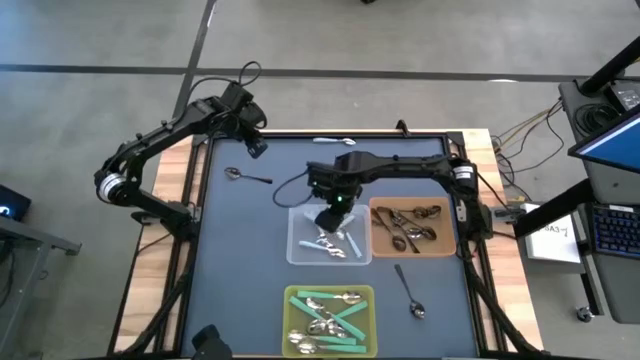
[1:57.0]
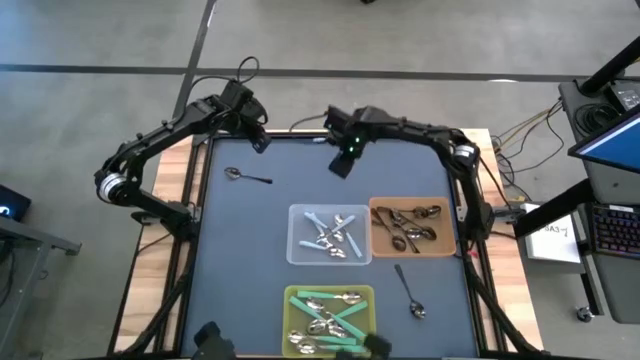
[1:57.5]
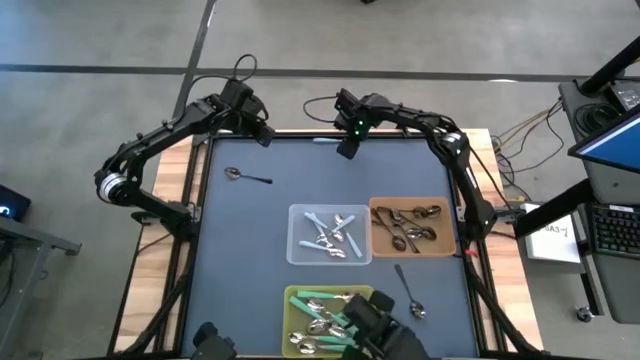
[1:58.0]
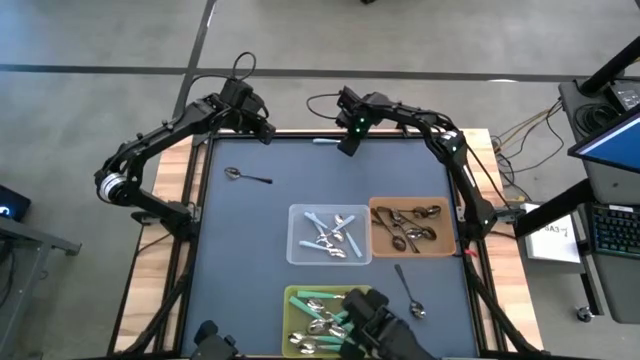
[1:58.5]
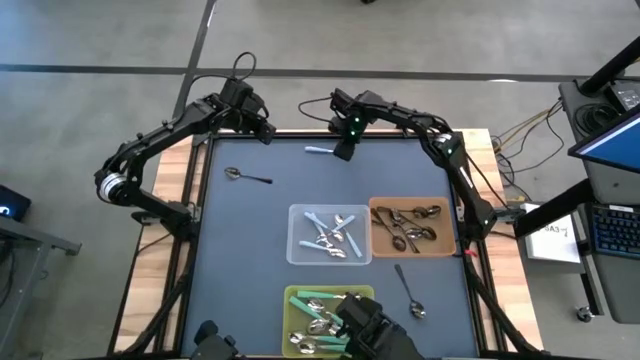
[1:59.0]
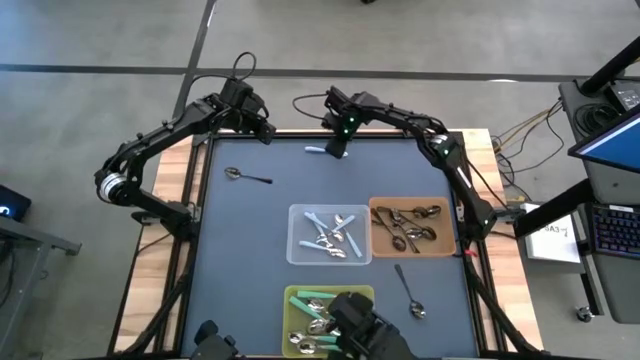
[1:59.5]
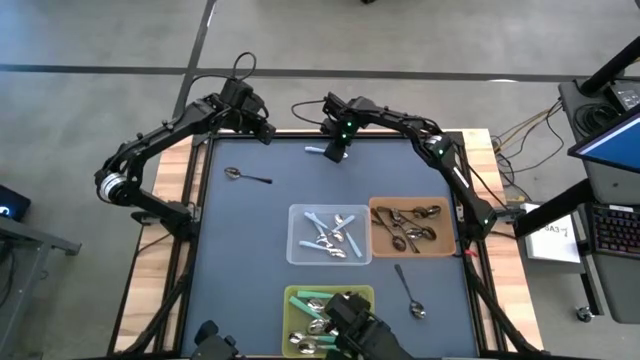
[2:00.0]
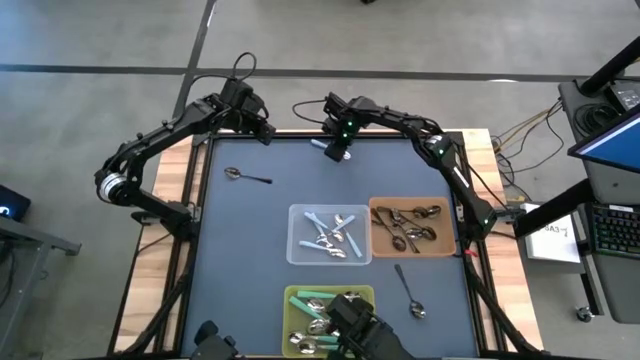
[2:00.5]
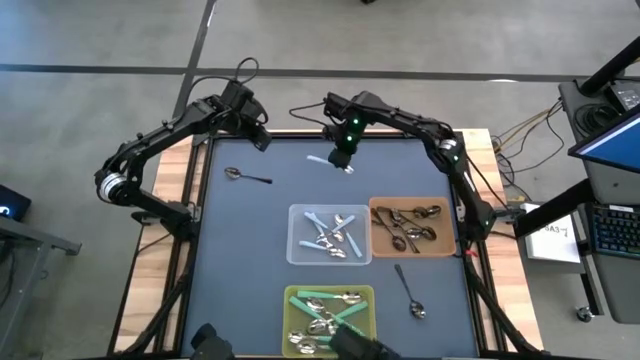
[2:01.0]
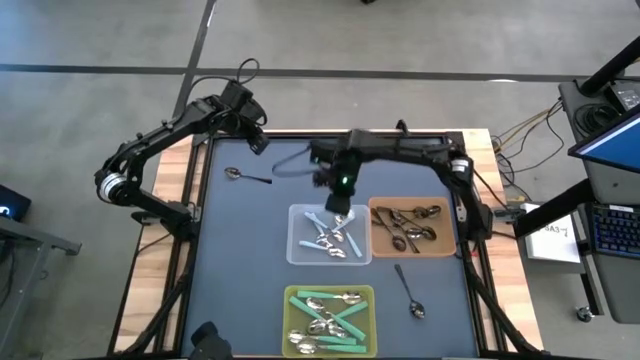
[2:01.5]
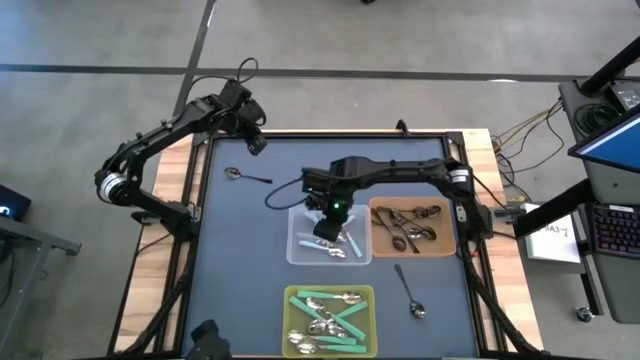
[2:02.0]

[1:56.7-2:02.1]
Task: Sort silverware by color (type)
Put the light blue spoon into the transparent bin

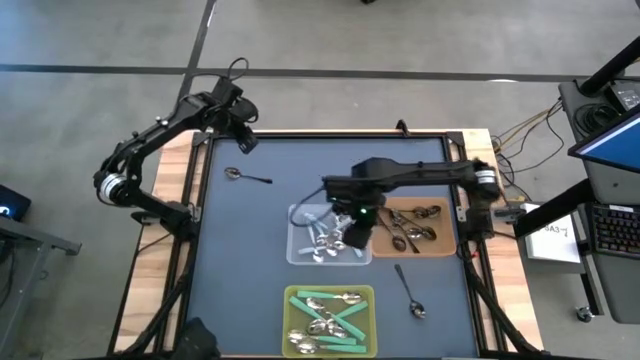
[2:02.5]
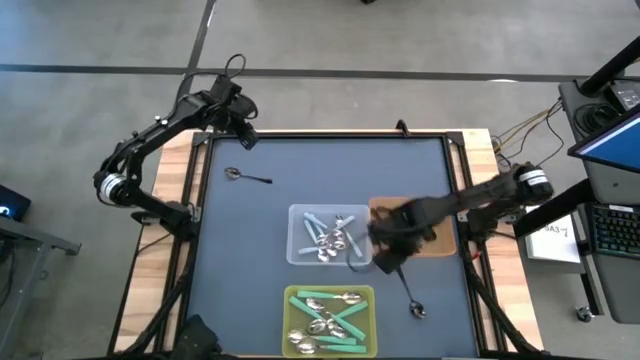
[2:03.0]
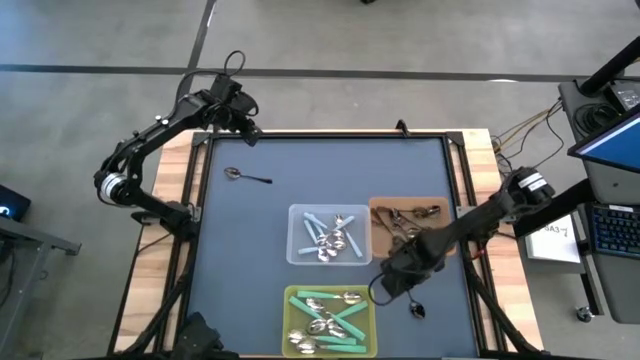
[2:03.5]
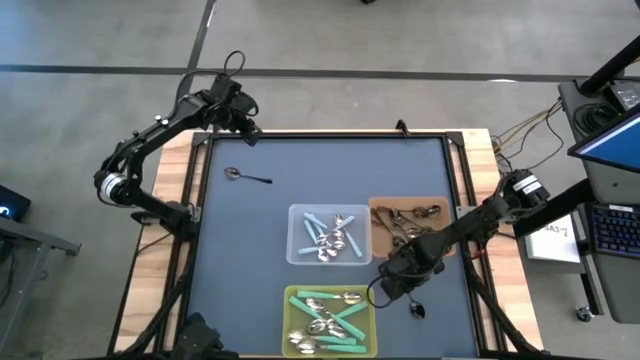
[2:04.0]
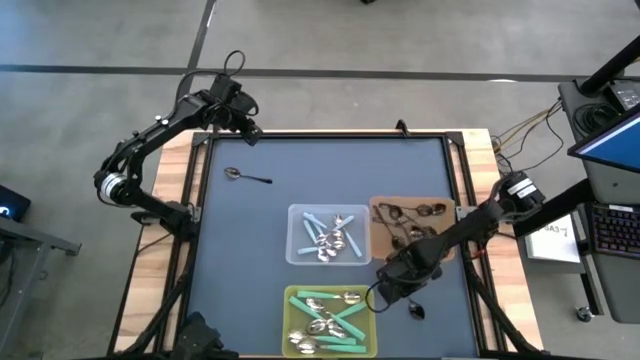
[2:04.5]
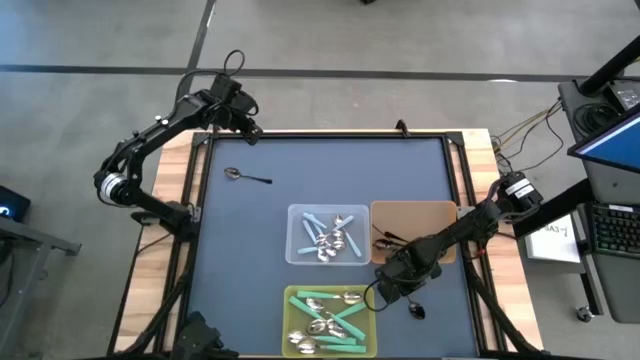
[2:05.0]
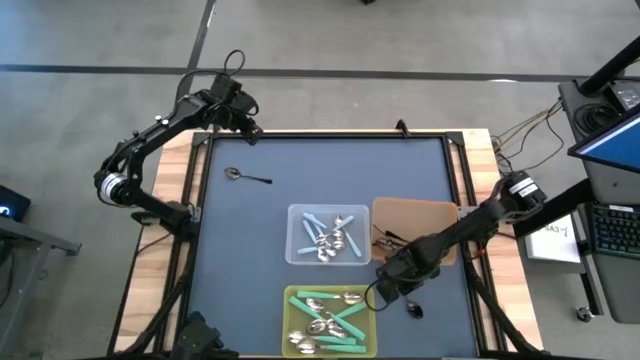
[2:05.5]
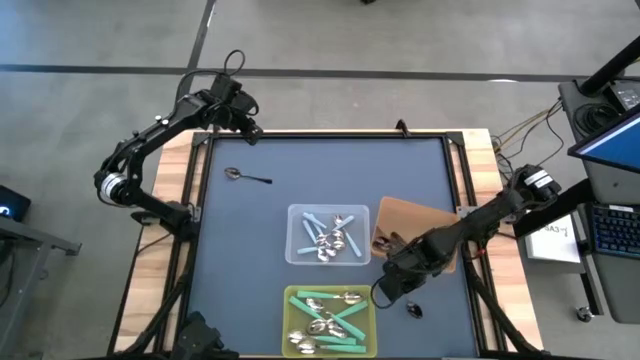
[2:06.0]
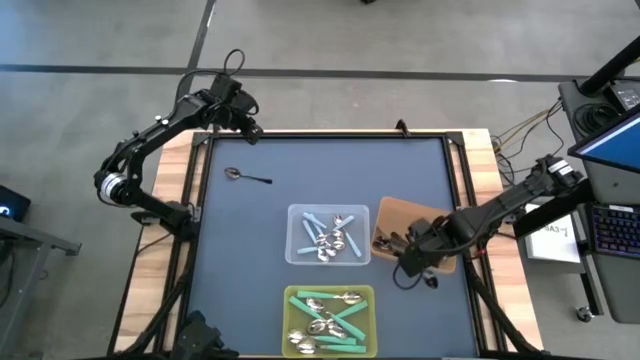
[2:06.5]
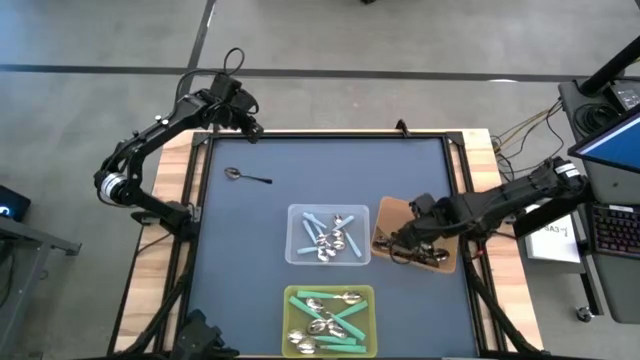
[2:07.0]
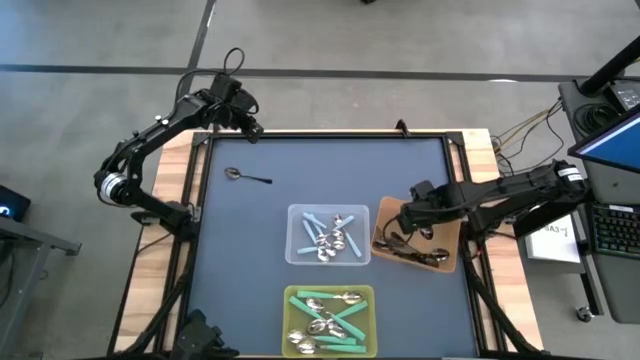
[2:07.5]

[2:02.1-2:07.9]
Put the black spoon into the orange bin

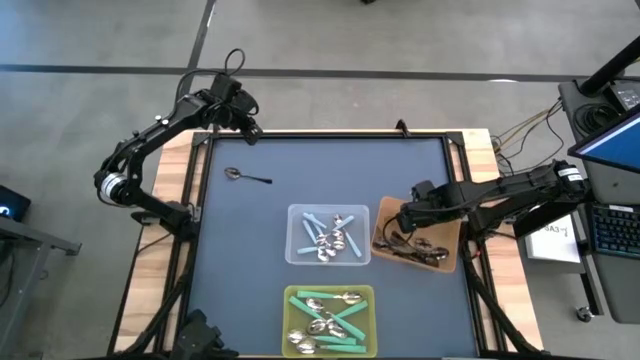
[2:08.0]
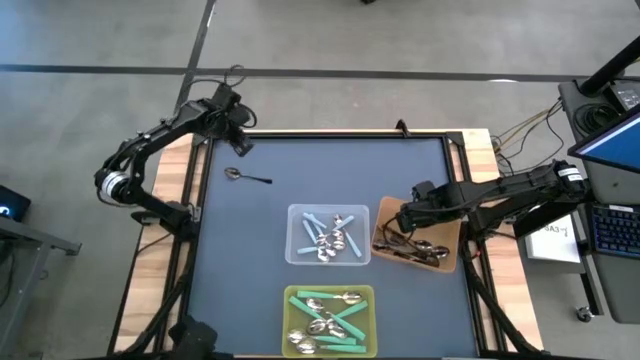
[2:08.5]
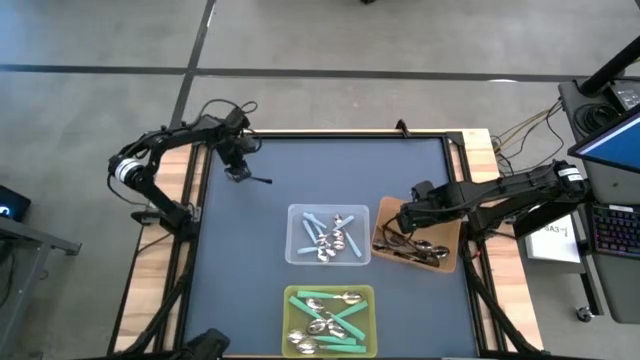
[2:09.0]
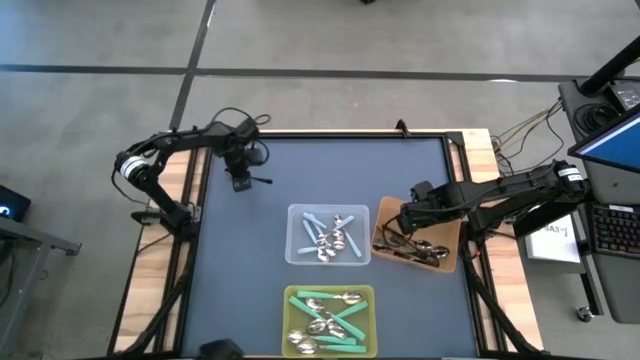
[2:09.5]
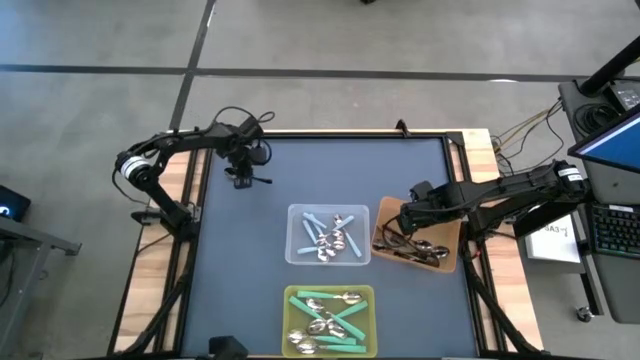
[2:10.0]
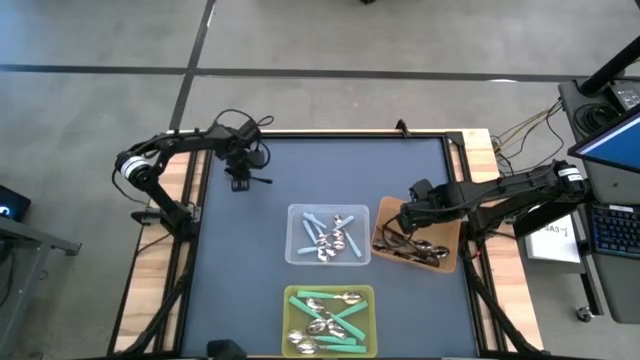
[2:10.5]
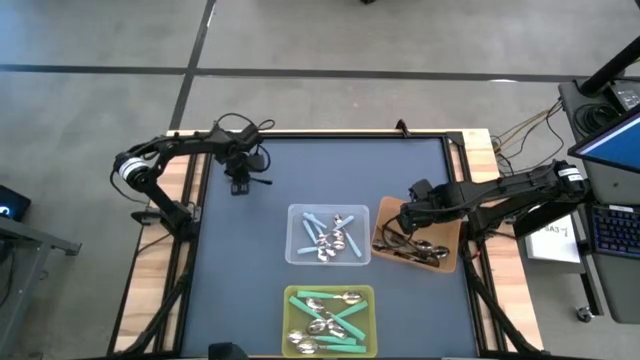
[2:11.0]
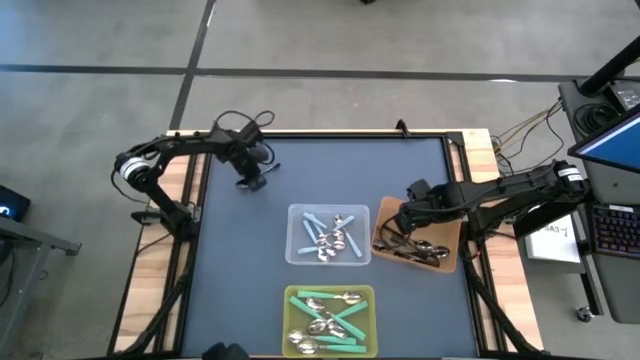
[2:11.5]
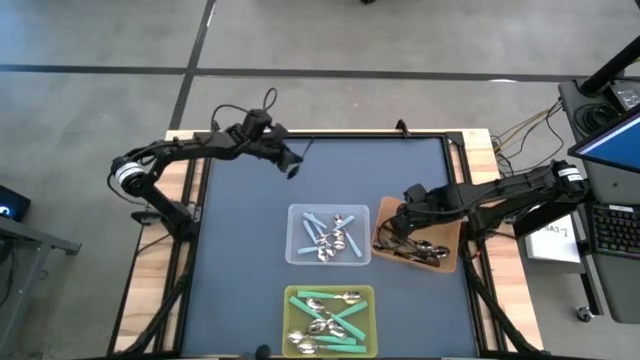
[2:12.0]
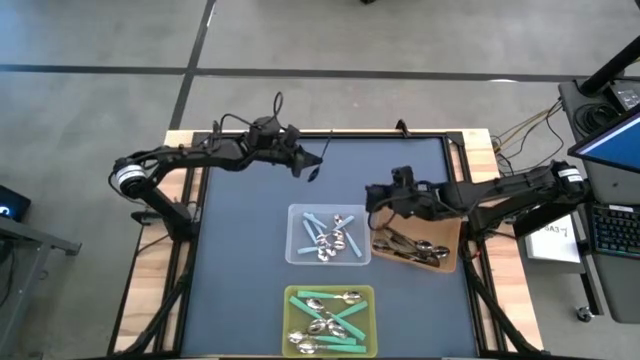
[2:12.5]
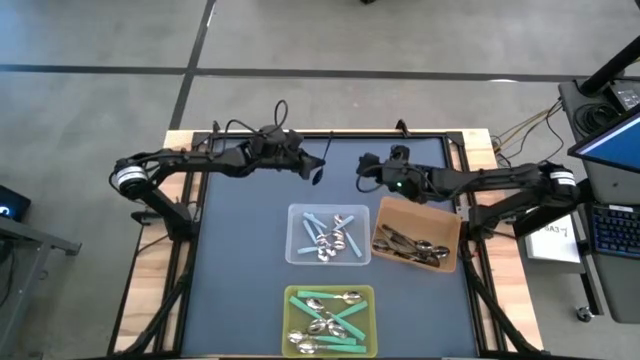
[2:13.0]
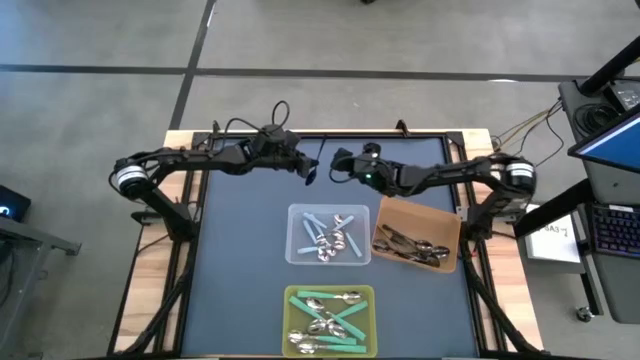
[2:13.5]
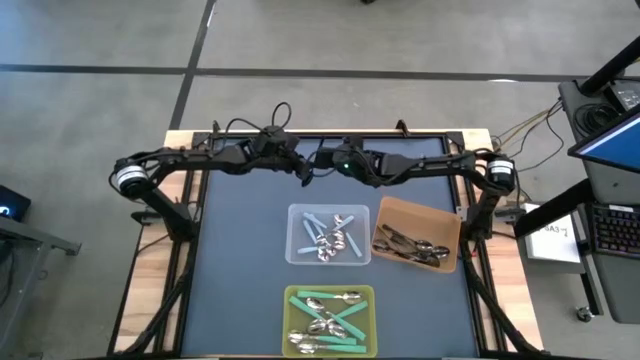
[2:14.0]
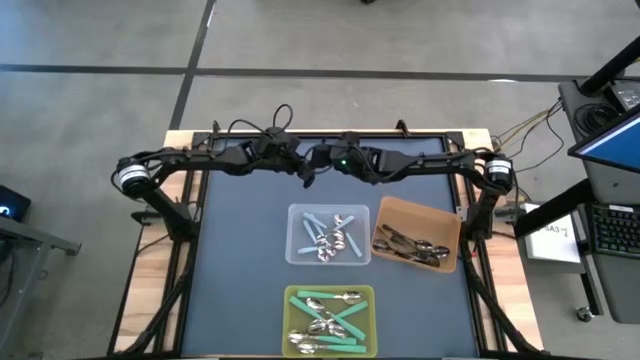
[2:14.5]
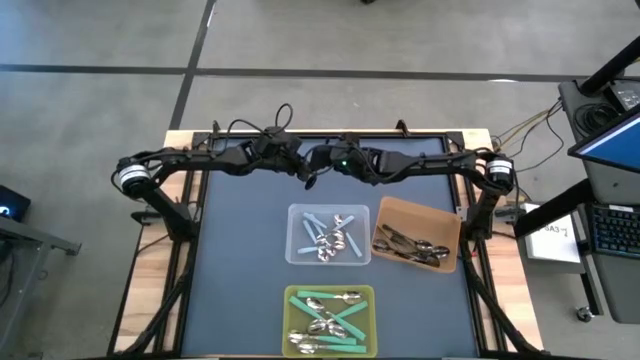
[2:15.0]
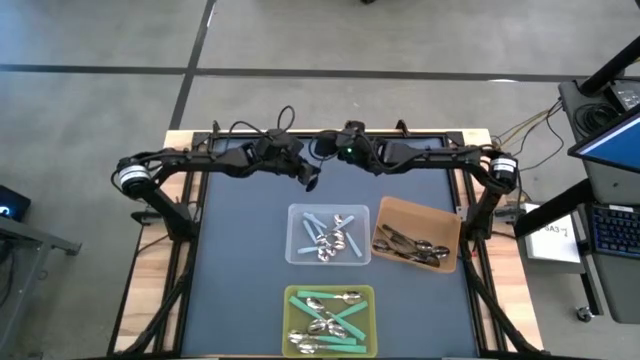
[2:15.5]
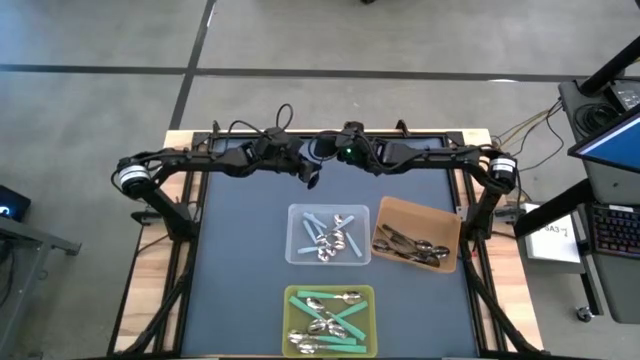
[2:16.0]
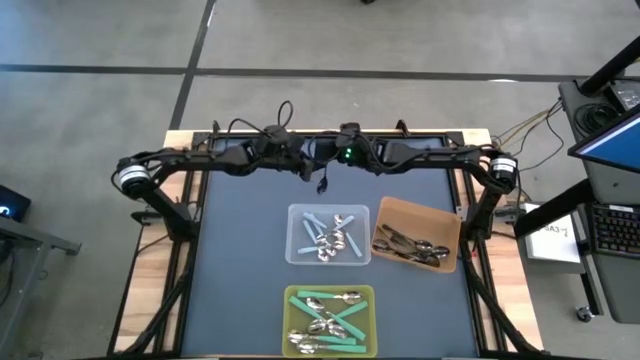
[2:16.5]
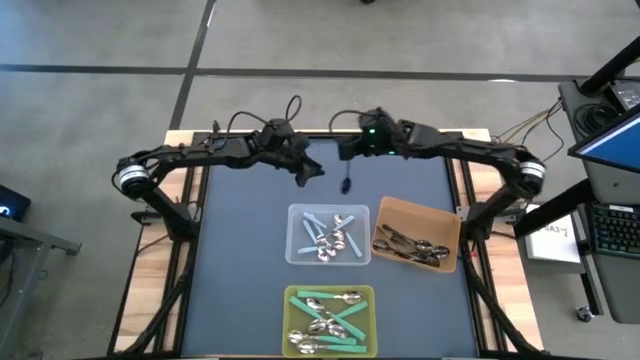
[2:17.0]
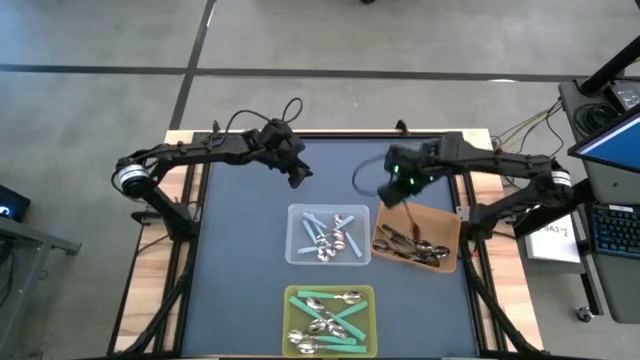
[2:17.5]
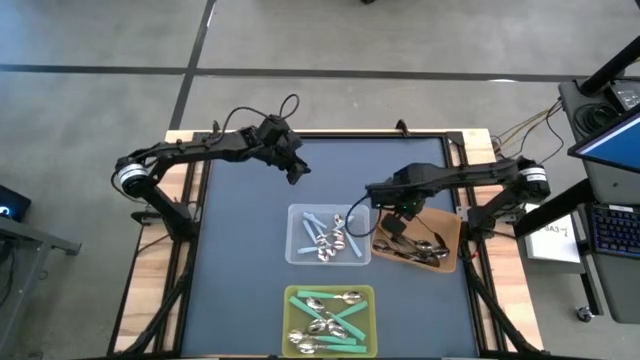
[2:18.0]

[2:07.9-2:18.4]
Put the black spoon into the orange bin
